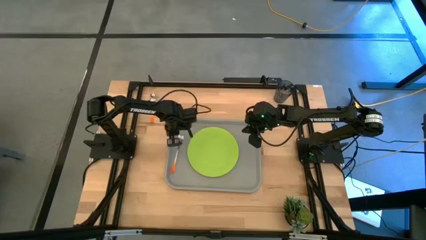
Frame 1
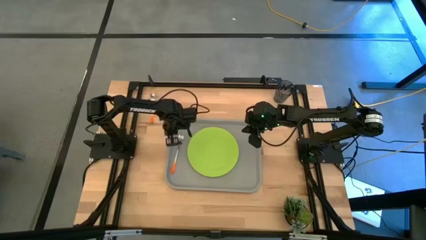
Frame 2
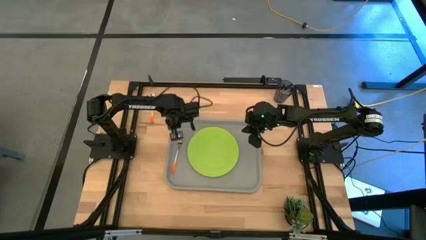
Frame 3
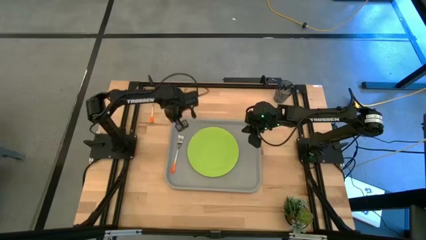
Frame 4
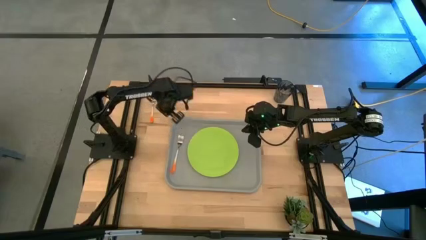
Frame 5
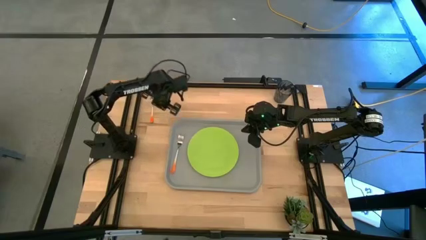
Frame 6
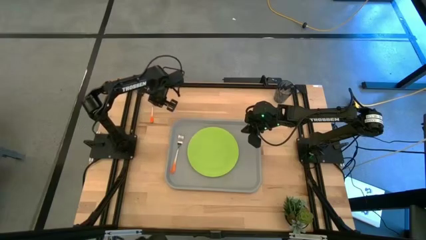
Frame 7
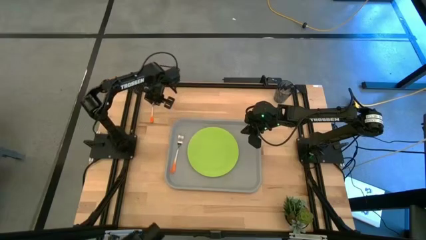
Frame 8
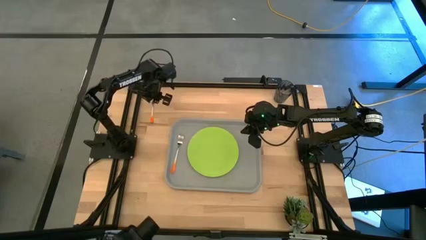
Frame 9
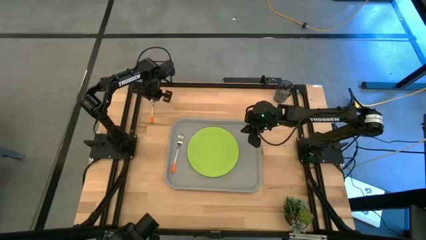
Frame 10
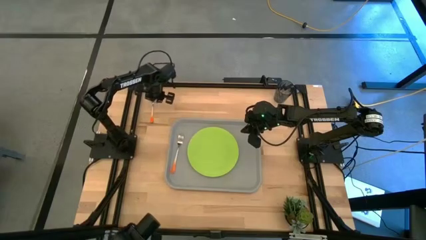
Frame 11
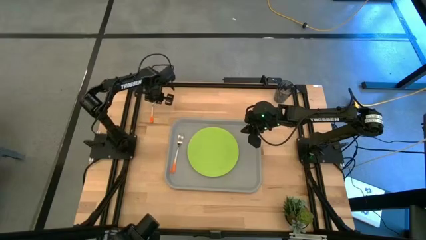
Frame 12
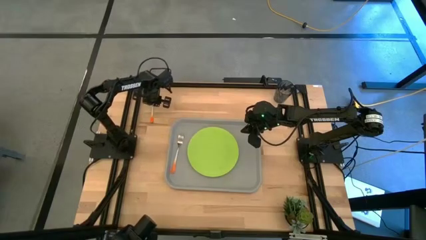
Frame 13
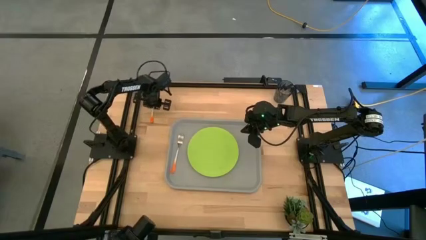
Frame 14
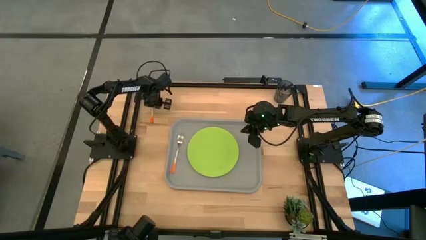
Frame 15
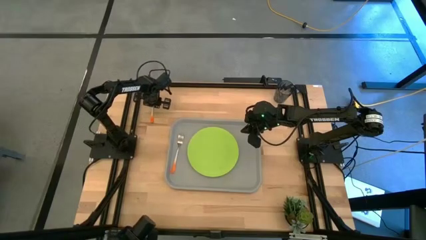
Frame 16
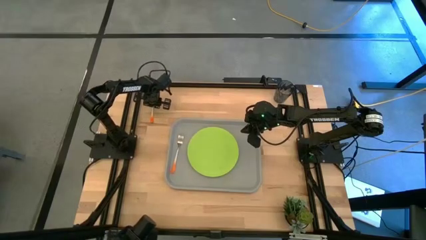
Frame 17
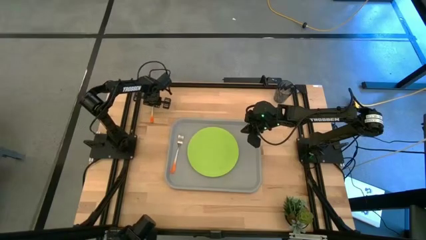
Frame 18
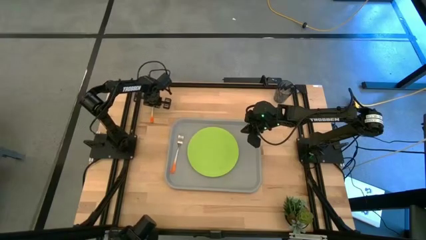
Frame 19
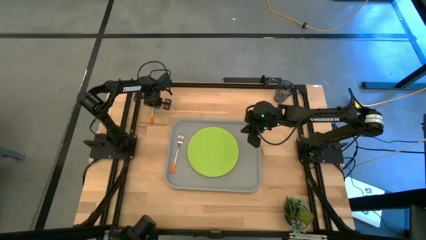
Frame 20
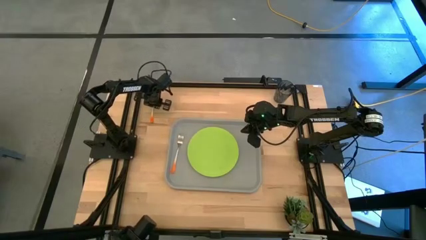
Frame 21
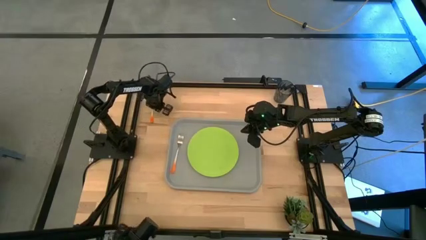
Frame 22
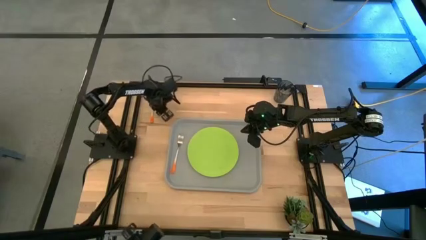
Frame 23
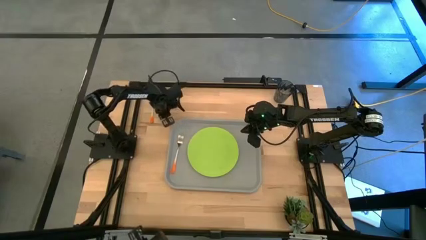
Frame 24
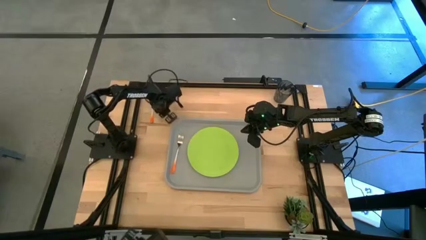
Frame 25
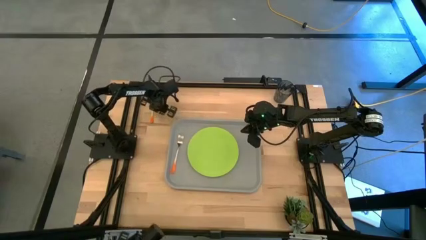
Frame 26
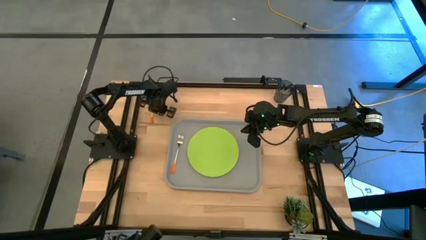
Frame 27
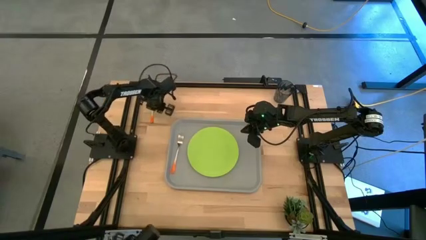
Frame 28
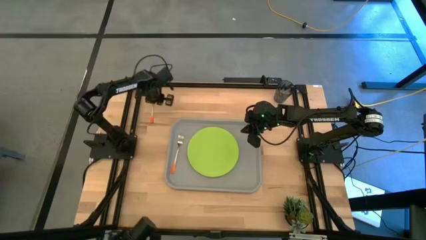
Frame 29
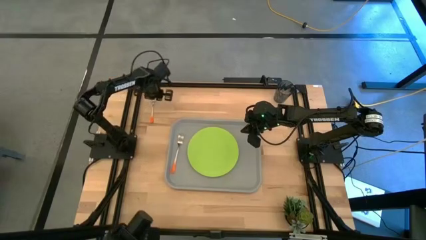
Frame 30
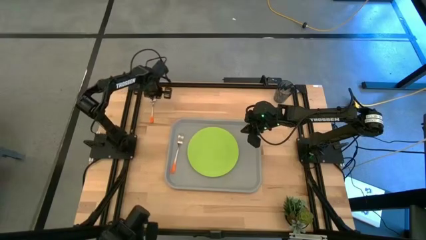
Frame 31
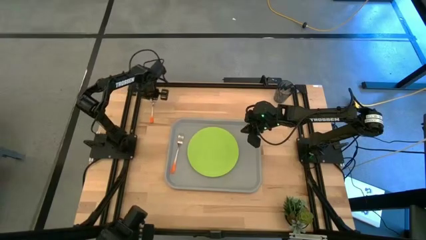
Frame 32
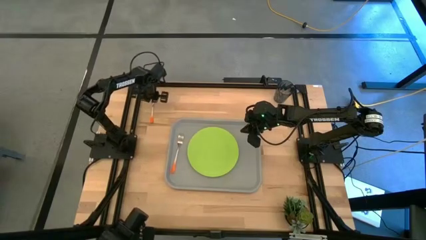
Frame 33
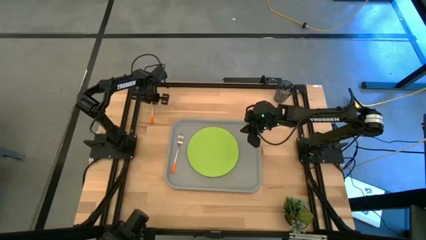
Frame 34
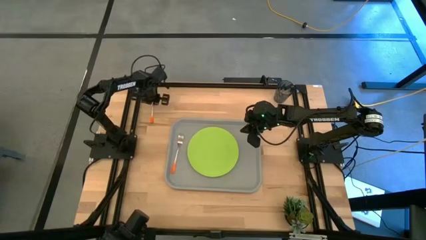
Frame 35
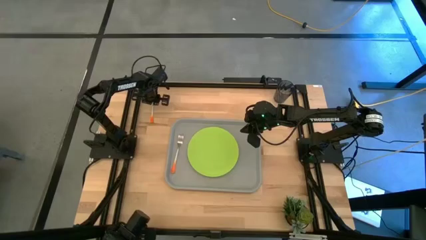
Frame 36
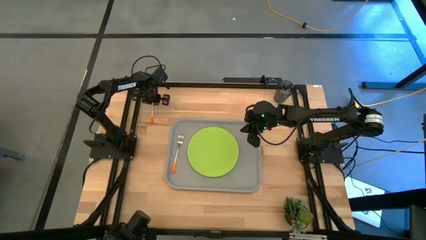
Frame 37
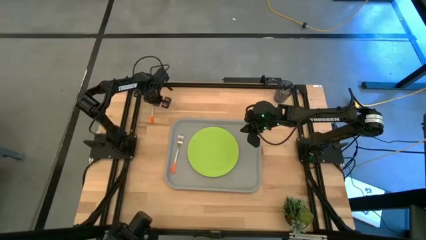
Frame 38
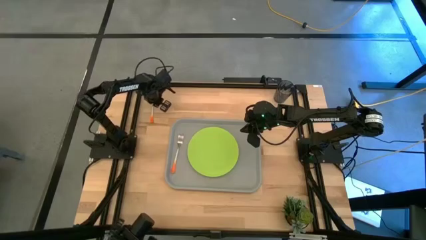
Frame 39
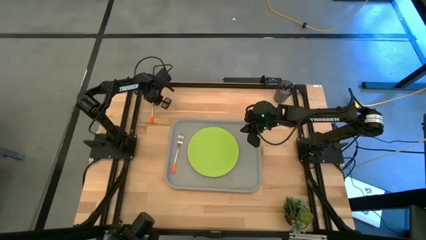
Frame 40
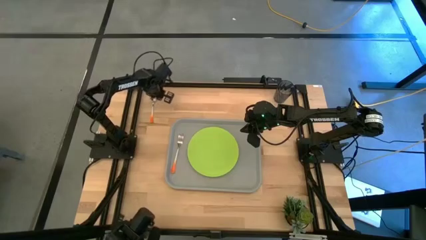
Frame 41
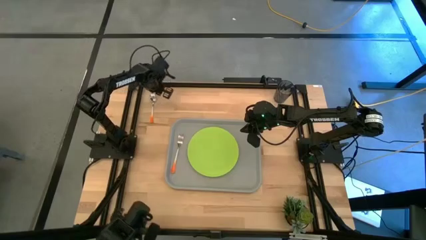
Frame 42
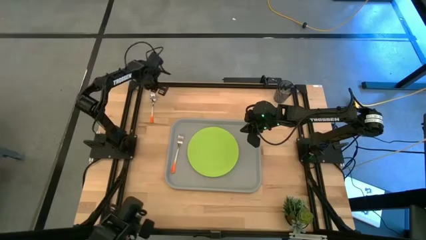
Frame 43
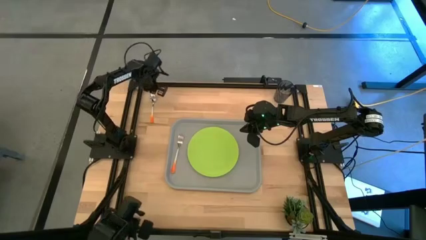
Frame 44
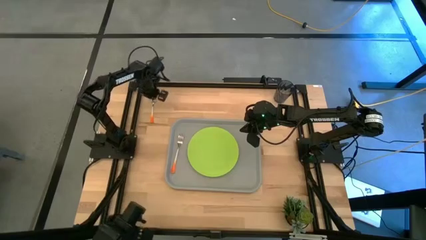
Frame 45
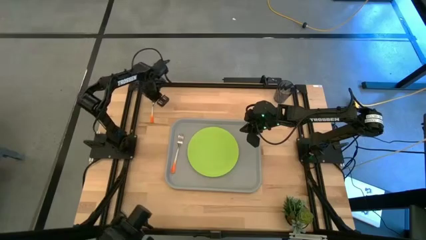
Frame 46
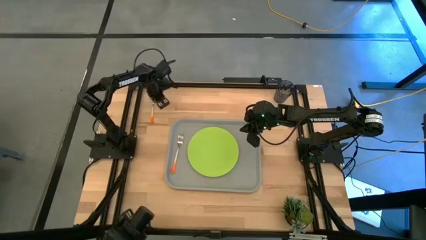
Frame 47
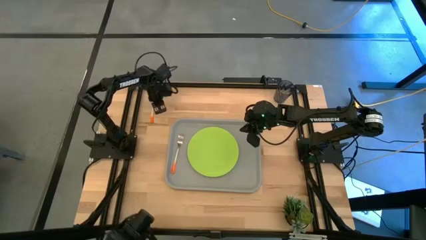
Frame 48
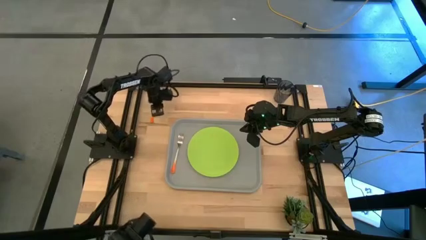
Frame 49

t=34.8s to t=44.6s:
Task: Pick and place plate/cup/fork/spoon on tray
Put the orange spoon on the gray serving tray to the right side of the orange fork
